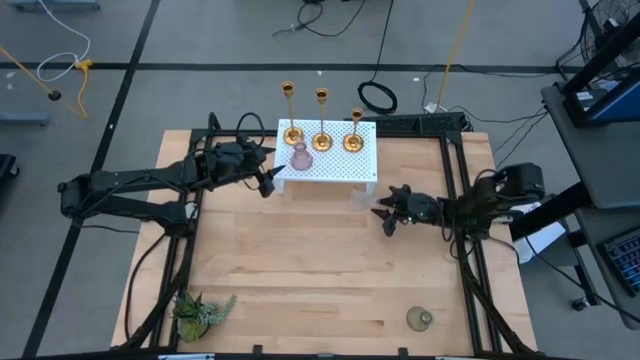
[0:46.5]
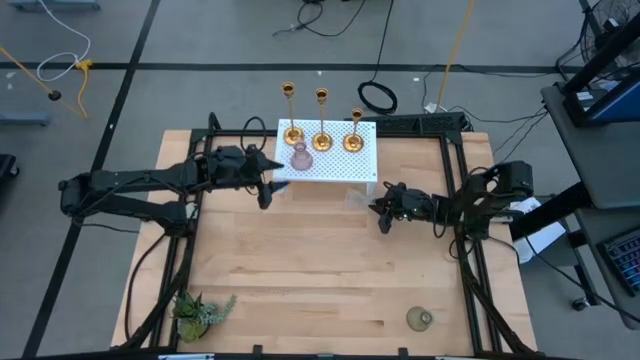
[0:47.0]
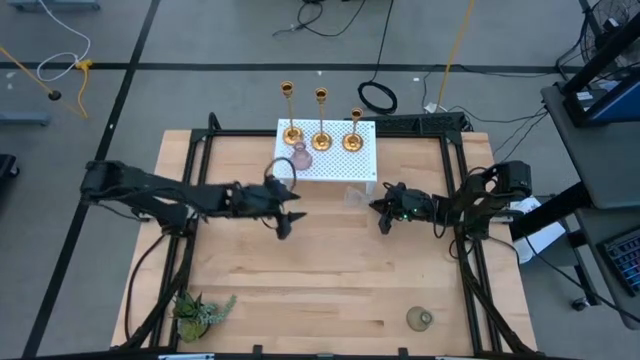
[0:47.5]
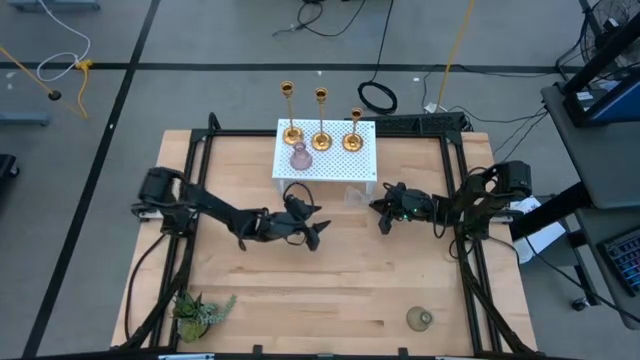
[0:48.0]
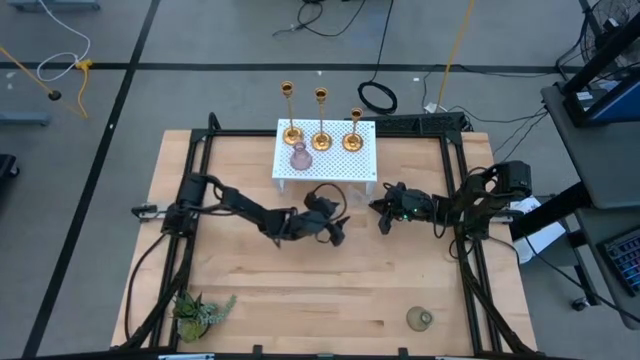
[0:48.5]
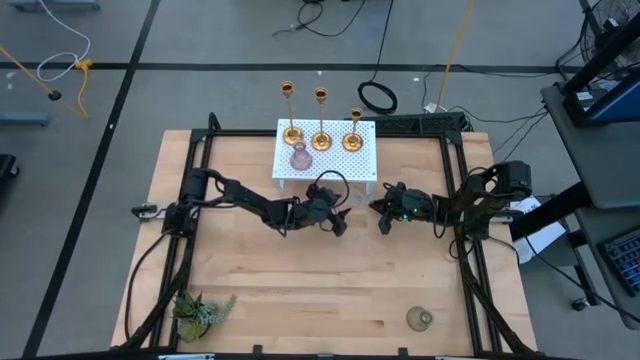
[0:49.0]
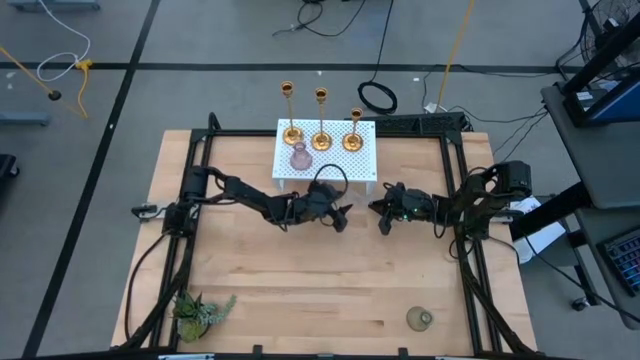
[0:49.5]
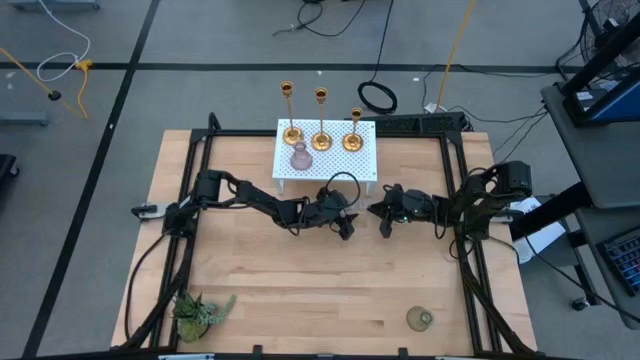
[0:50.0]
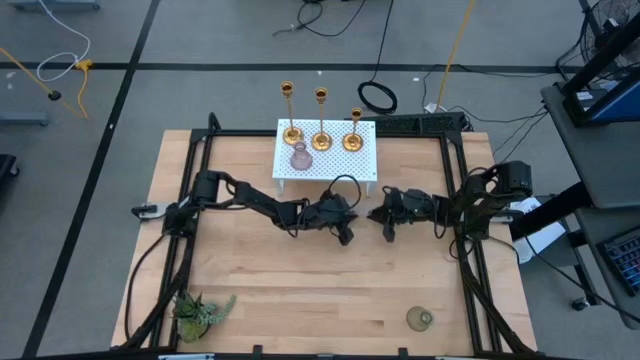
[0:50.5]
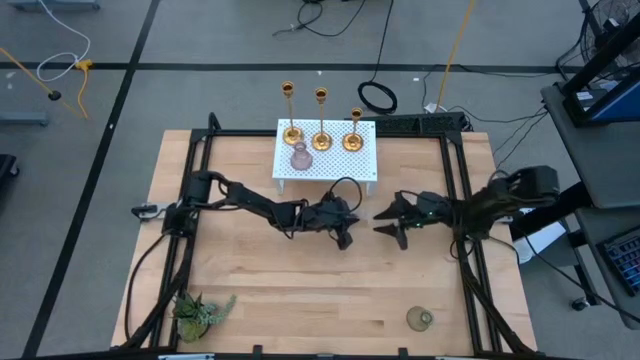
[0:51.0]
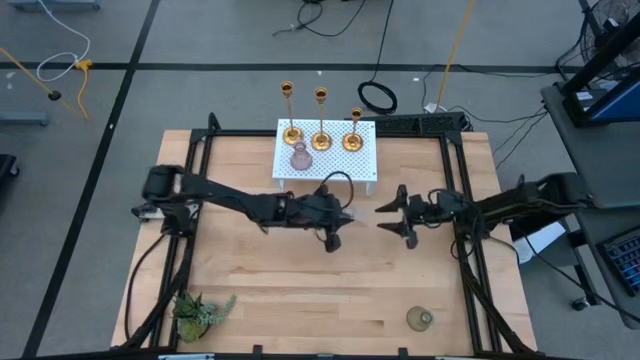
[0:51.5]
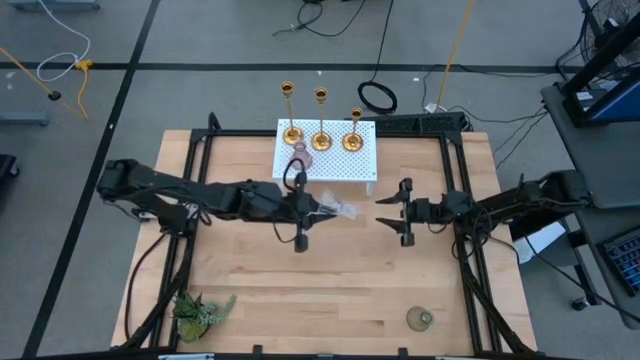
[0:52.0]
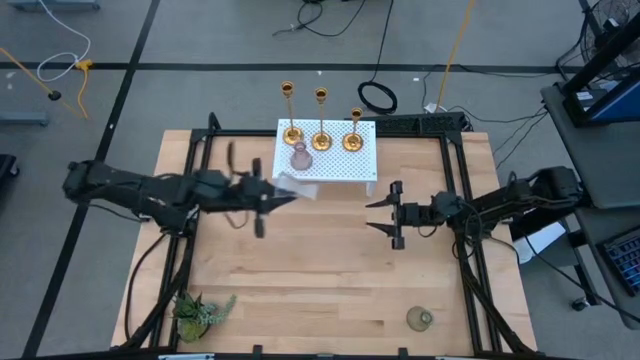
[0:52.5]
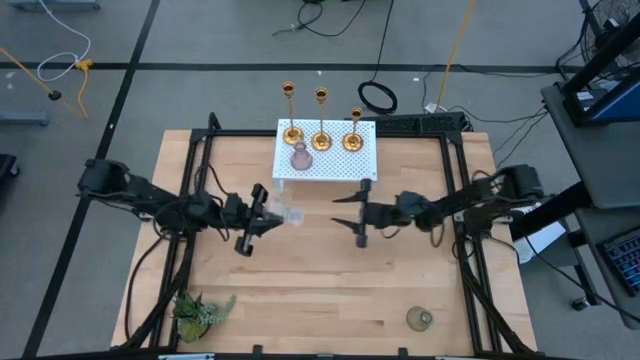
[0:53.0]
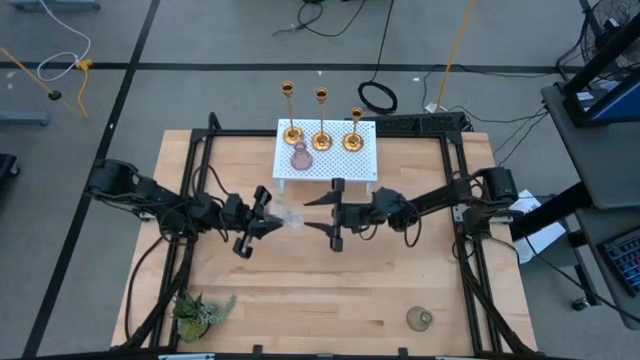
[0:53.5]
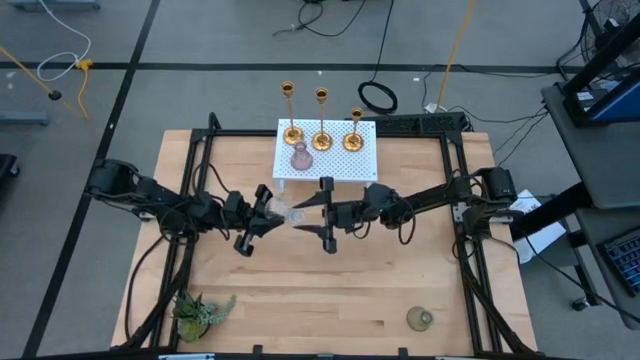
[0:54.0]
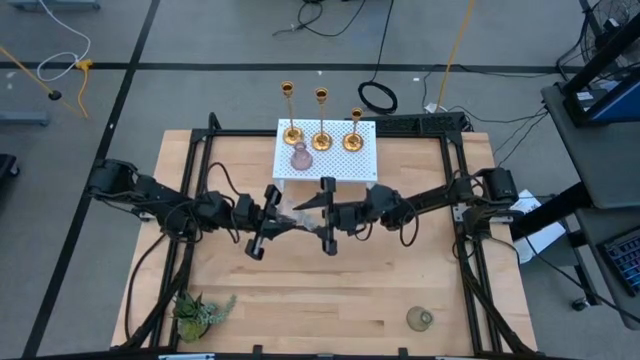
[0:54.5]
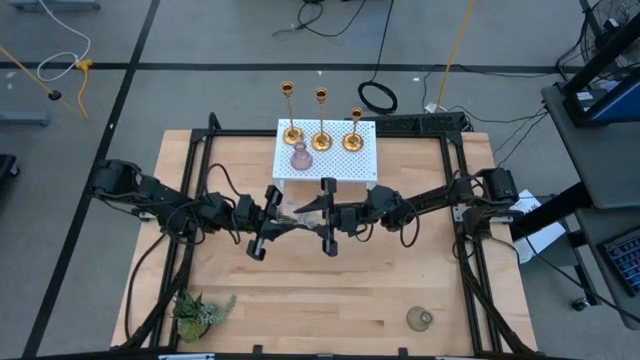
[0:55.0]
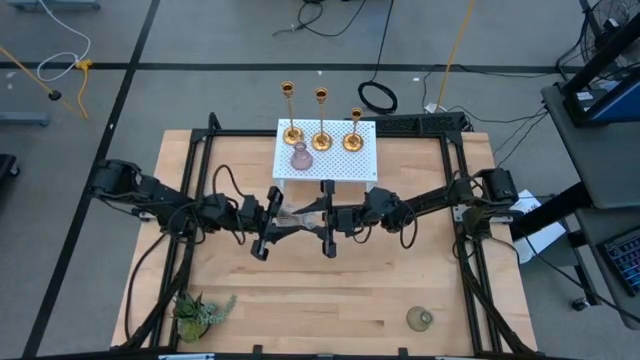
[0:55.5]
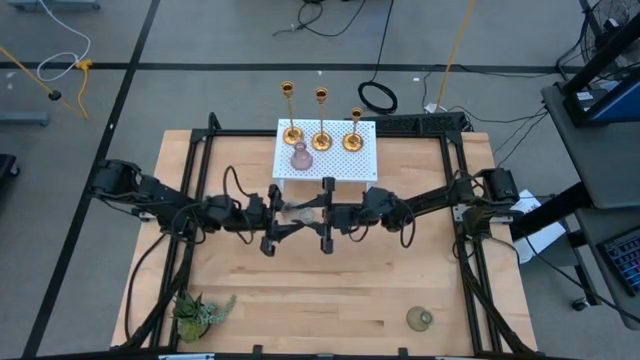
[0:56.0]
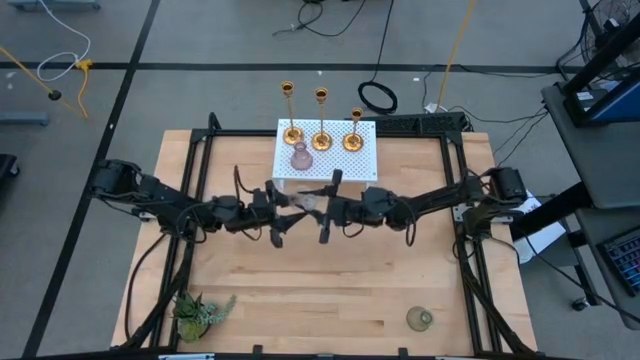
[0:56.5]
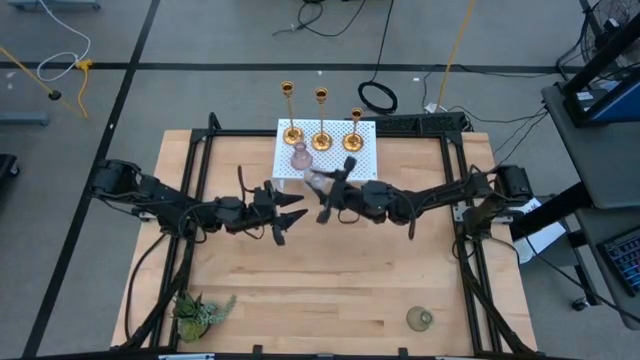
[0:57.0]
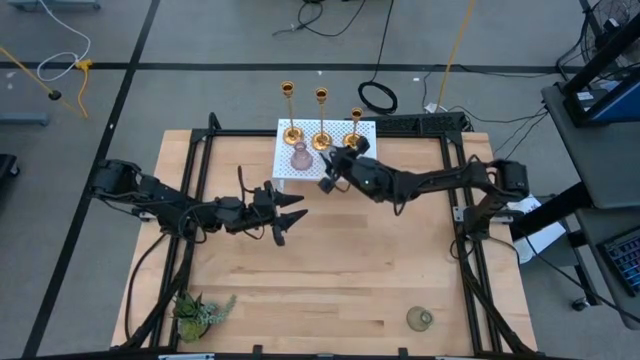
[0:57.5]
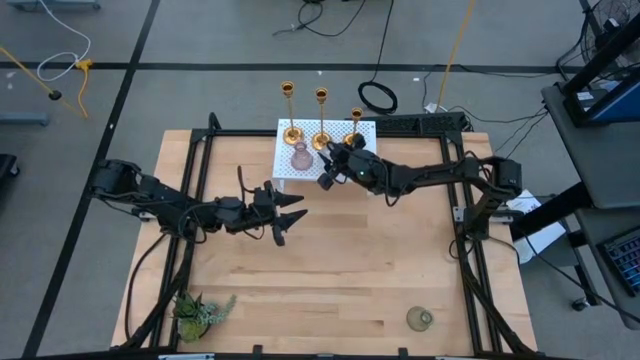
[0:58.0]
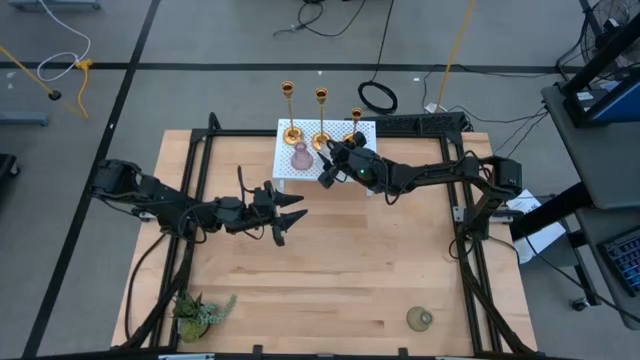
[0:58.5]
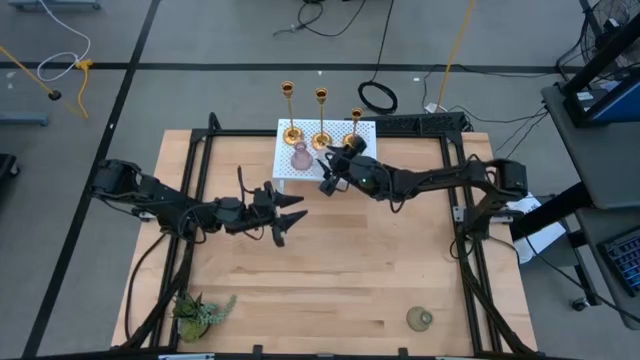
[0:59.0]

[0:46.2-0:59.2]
Task: Pick & Place candle stick holders
Put the bottom right green glass candle holder aligned with the golden candle holder on the shelf

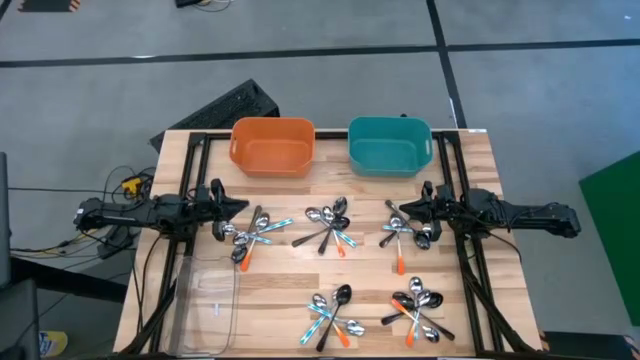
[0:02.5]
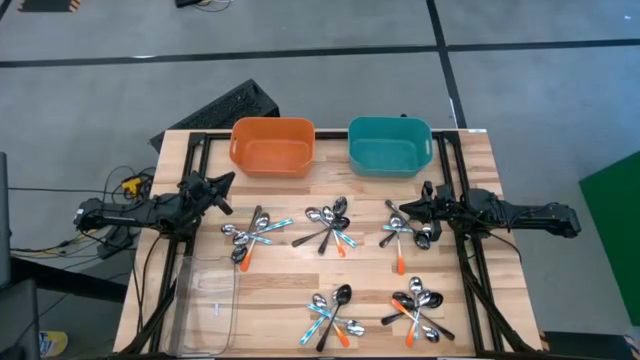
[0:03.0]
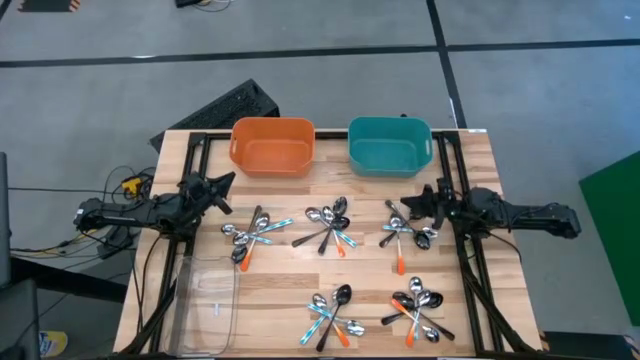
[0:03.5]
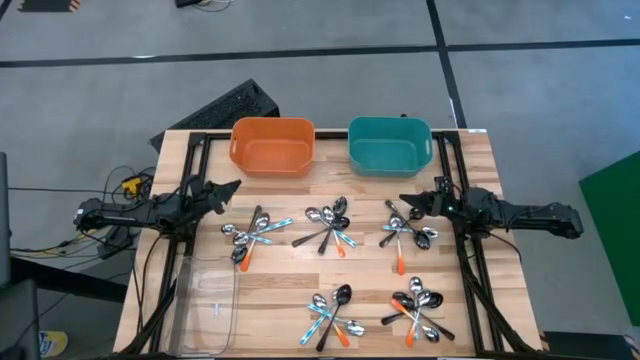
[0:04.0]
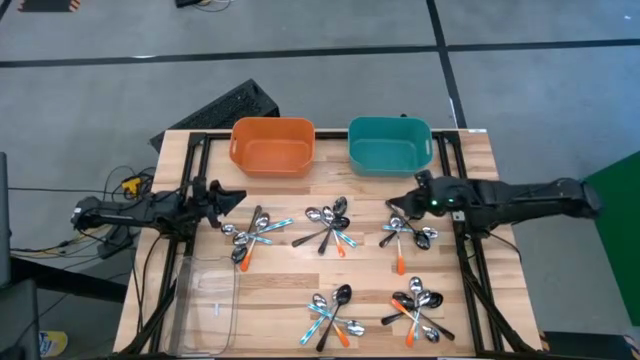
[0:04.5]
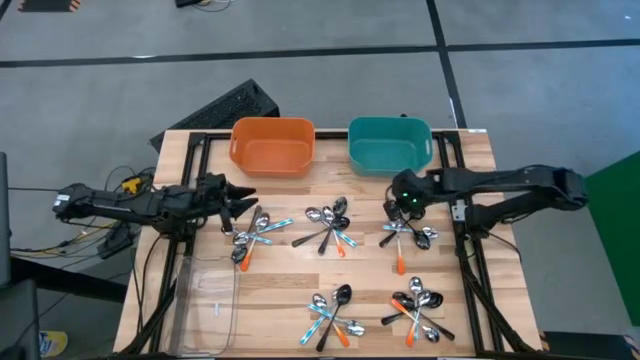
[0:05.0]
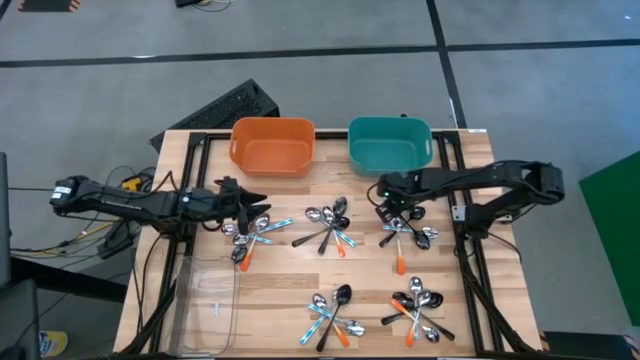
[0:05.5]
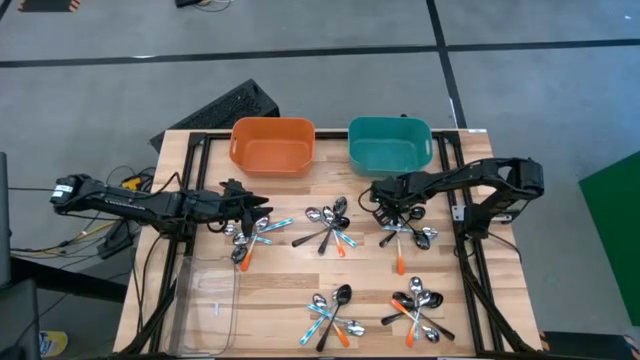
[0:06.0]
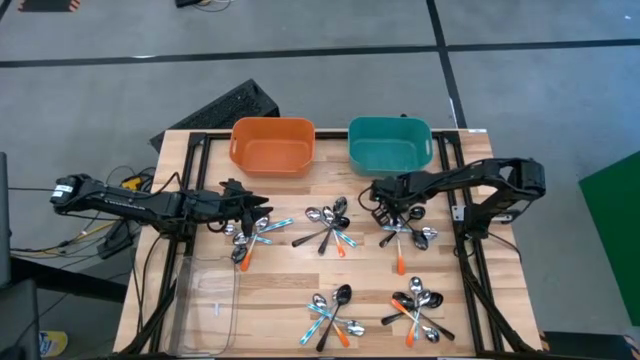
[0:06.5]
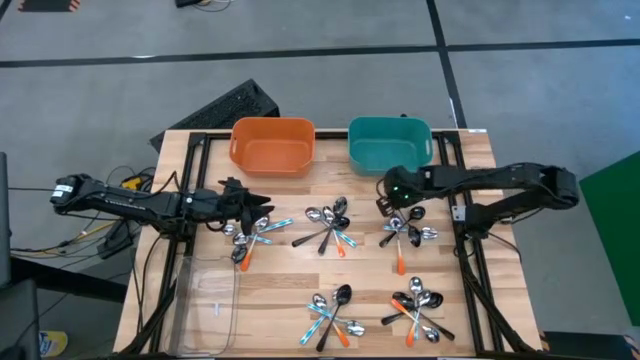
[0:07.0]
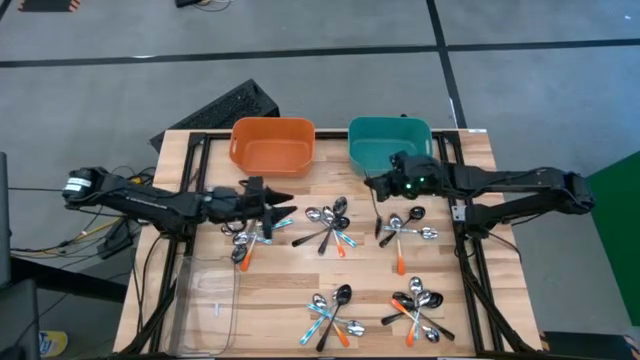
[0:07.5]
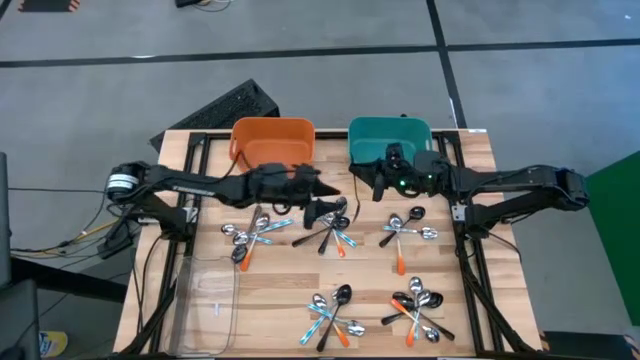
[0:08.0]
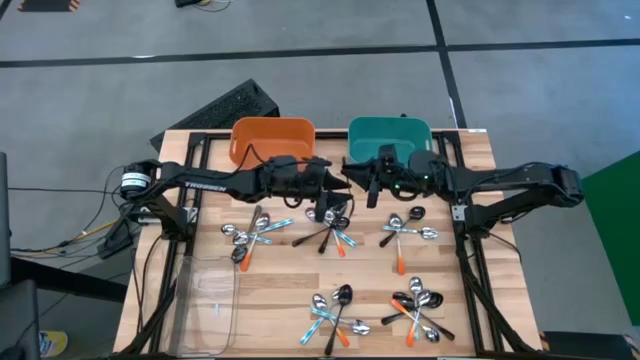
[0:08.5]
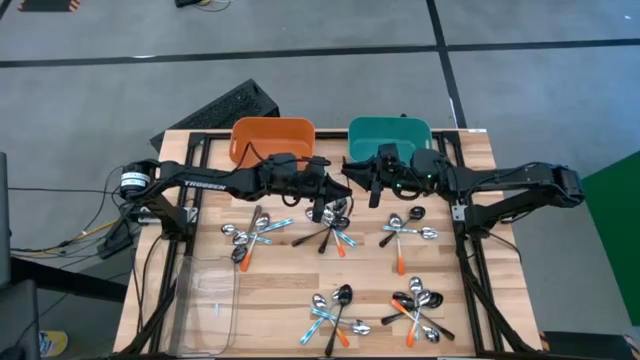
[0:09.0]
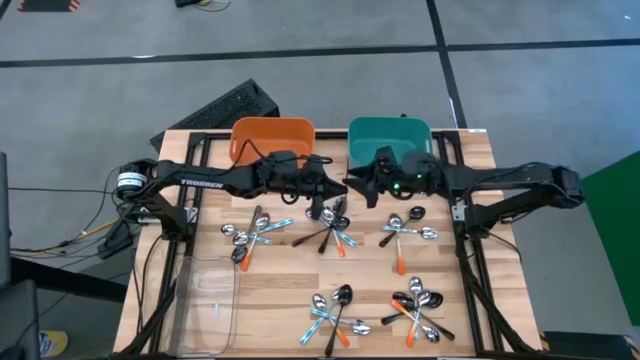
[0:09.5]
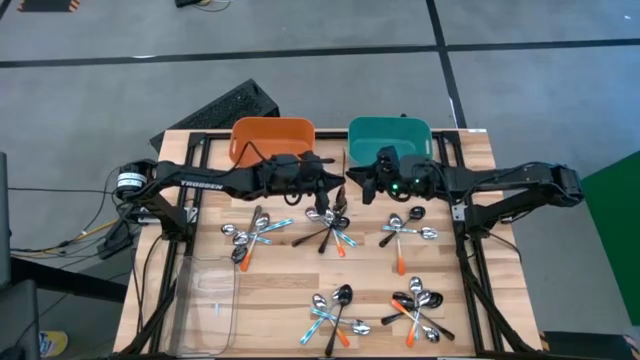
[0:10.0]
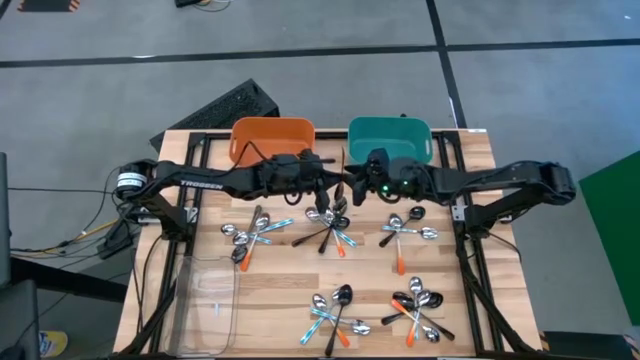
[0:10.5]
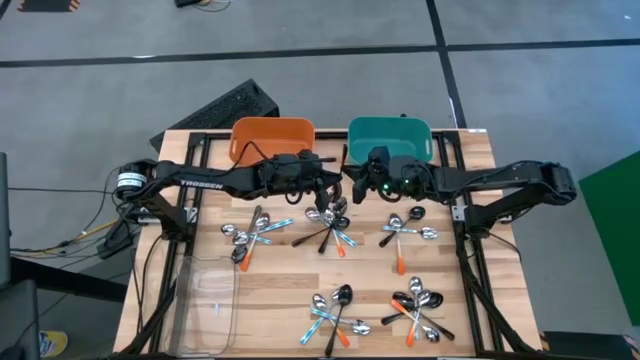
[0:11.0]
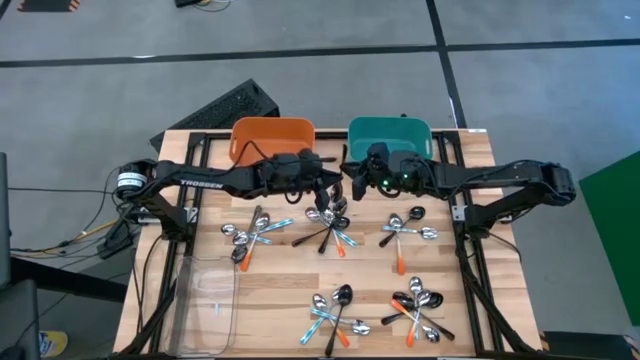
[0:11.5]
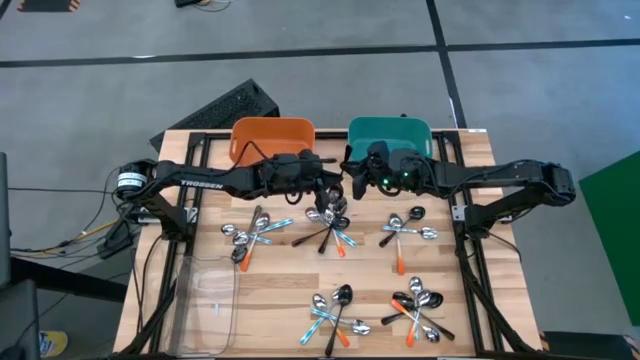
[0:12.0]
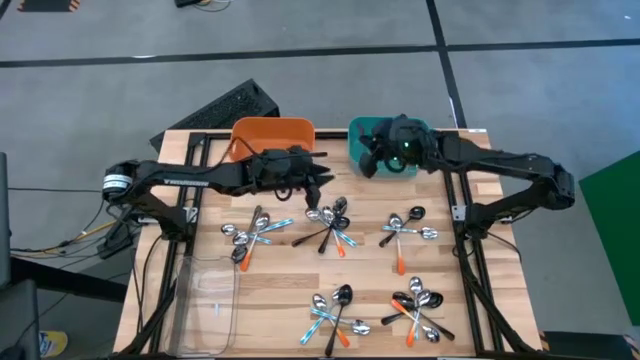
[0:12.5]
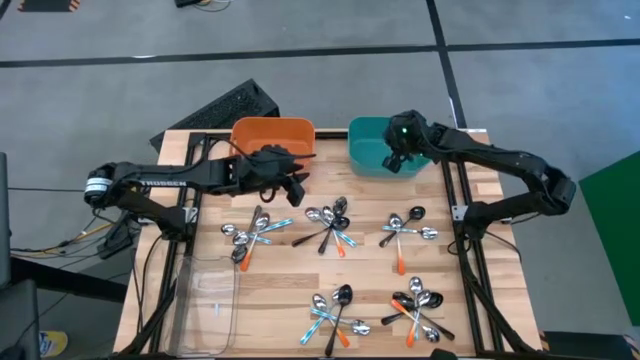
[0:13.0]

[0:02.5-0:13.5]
Task: Sort silverware by color (type)
Put the black spoon into the blue bin
